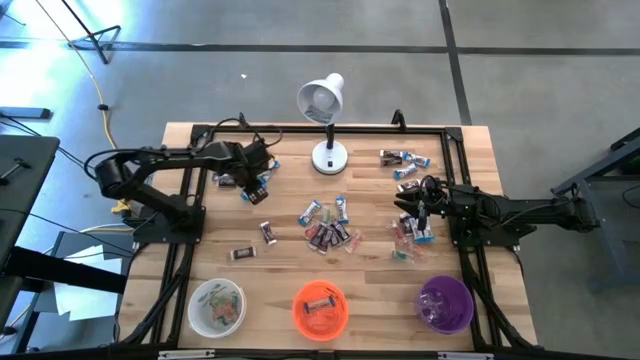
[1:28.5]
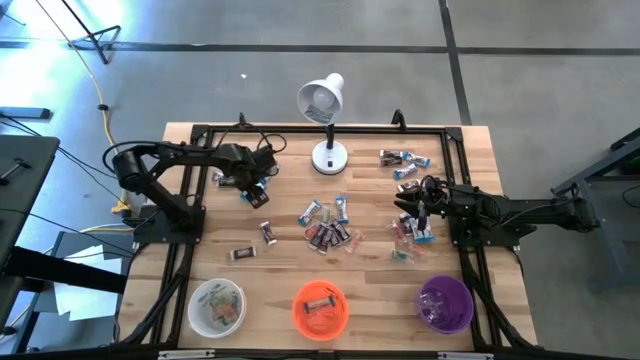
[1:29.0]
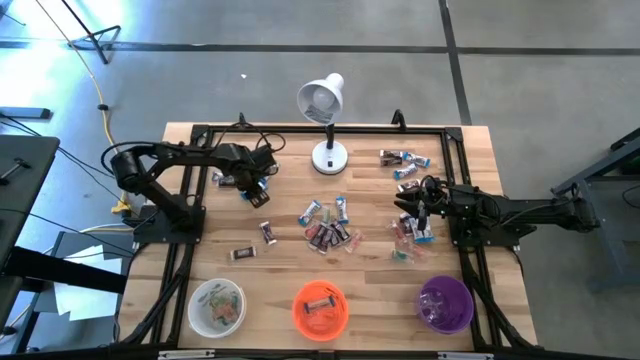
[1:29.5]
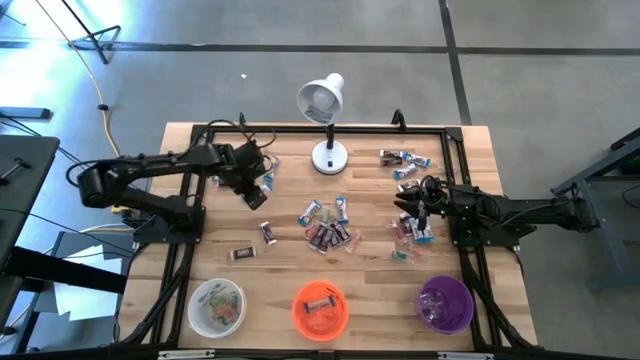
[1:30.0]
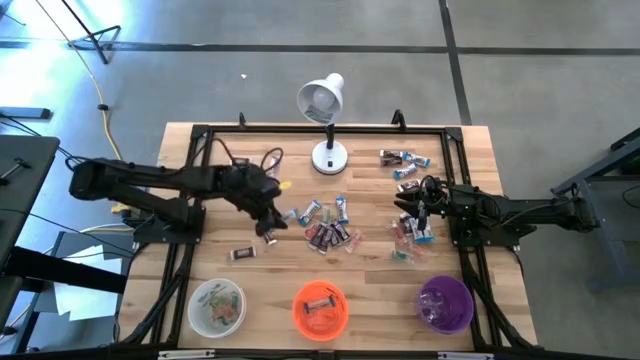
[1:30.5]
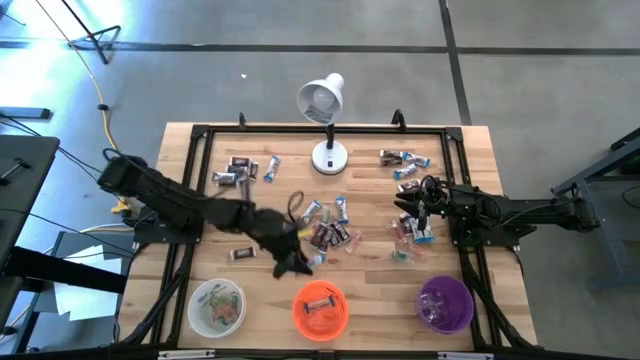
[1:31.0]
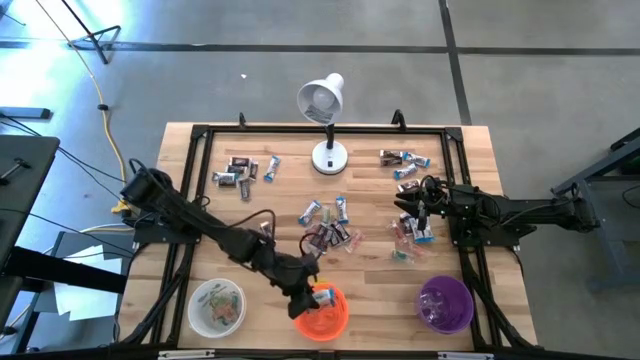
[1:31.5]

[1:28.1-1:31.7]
Task: Organize candy in baskets
Put the white chocolate bar into the orange bucket

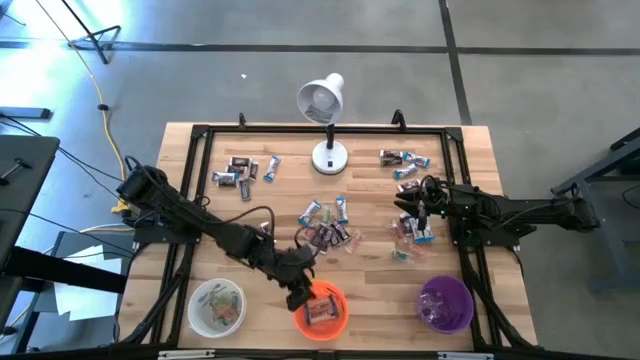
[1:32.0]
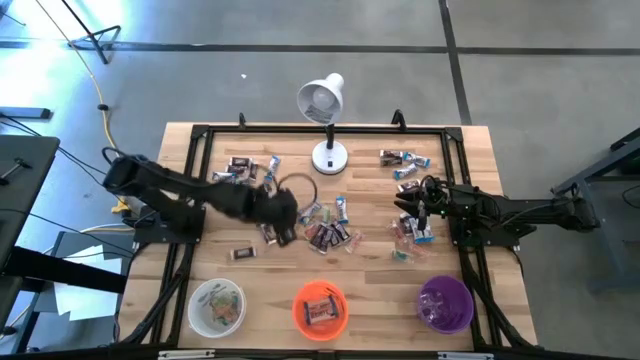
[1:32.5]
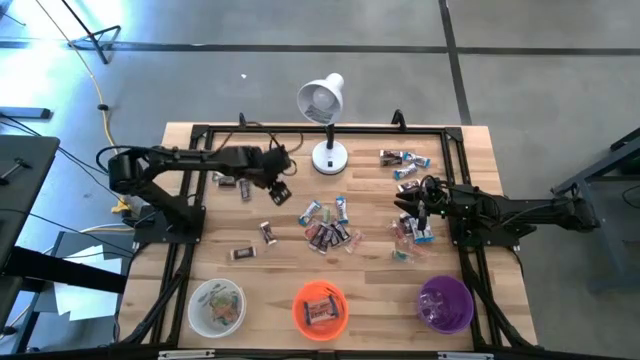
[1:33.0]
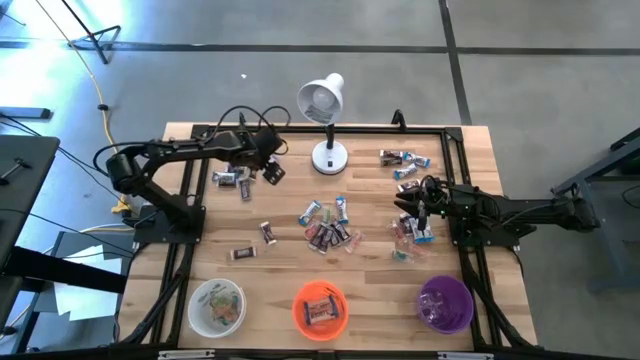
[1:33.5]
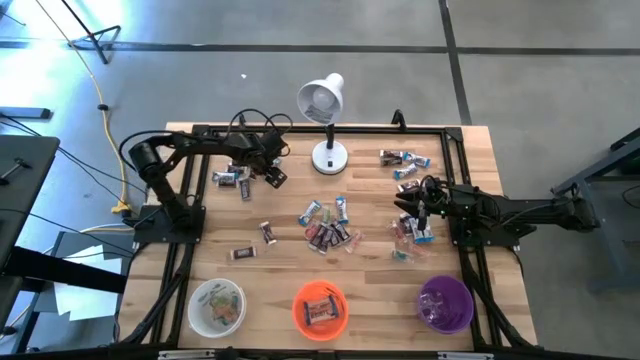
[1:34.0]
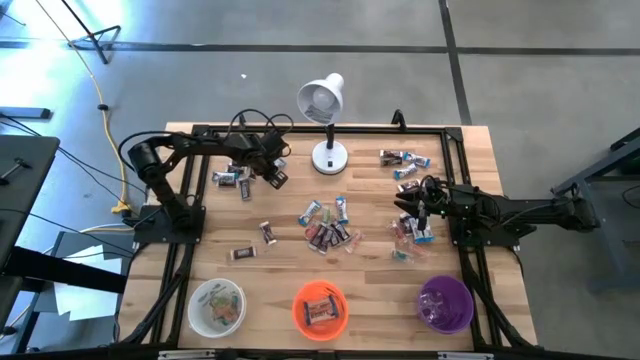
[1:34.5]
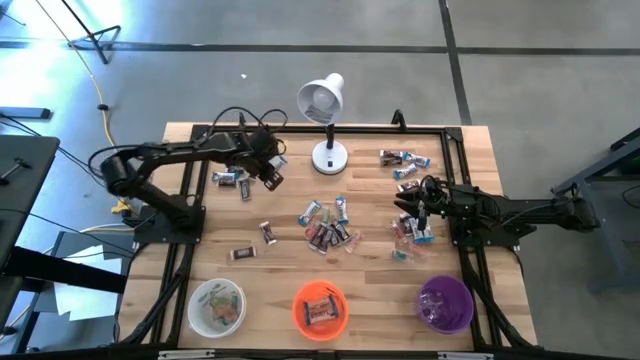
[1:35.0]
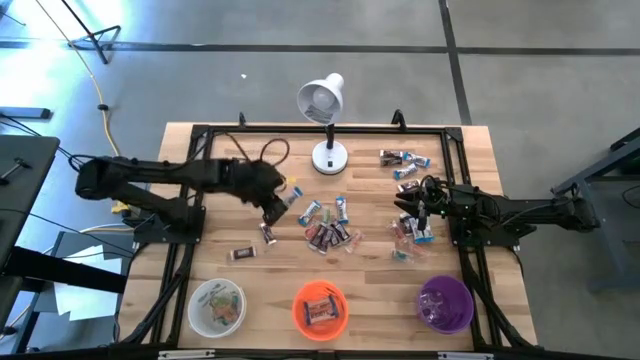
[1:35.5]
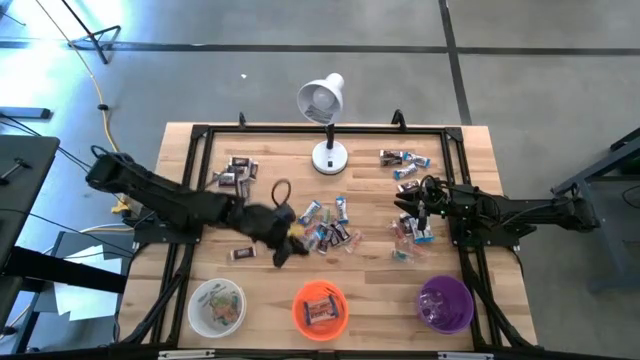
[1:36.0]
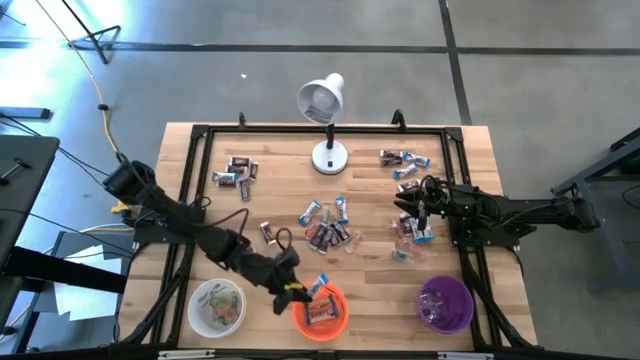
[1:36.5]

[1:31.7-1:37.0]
Put the white chocolate bar into the orange bucket

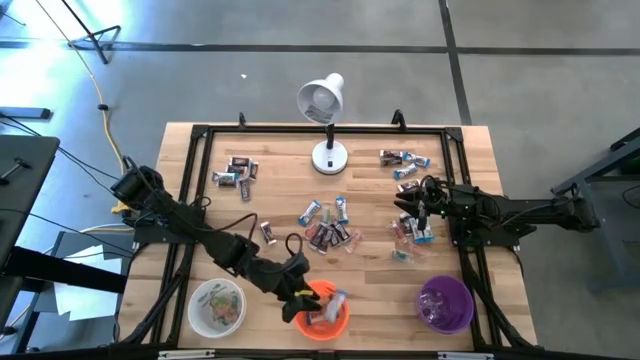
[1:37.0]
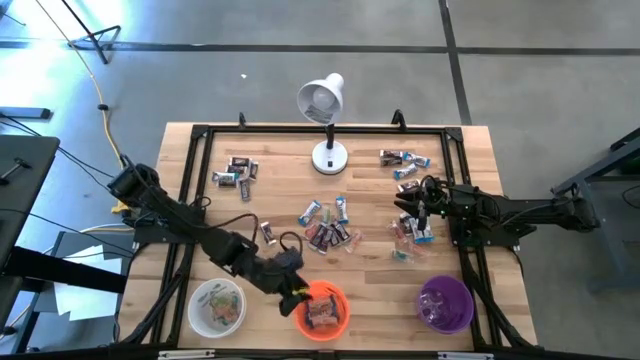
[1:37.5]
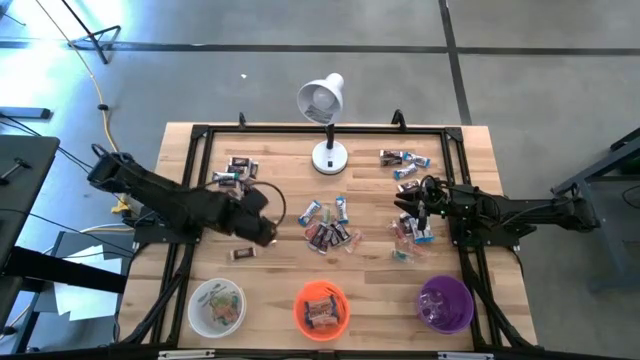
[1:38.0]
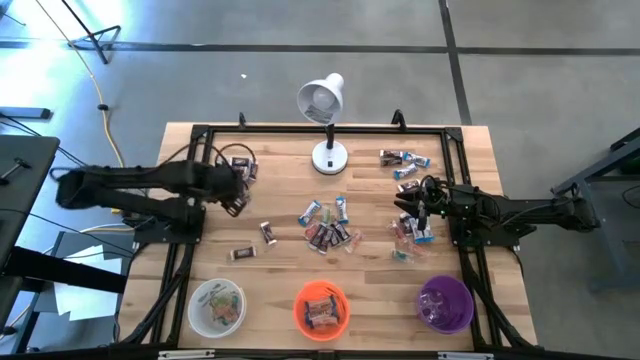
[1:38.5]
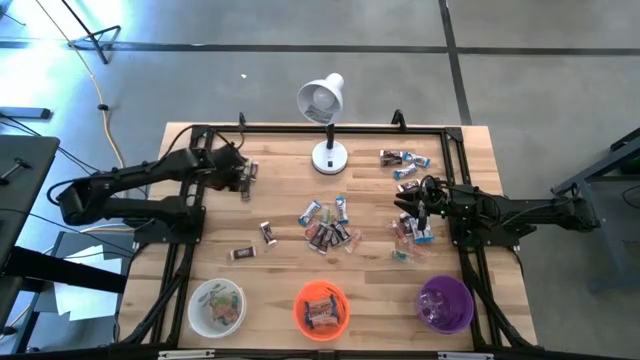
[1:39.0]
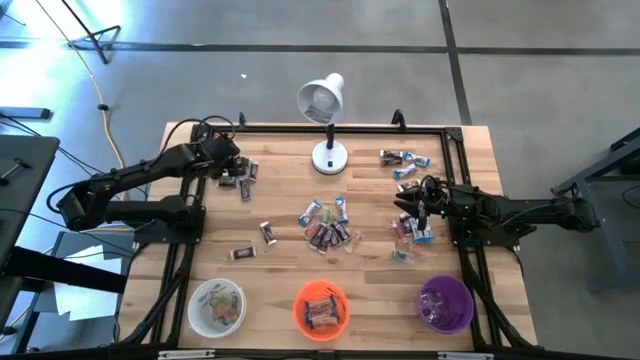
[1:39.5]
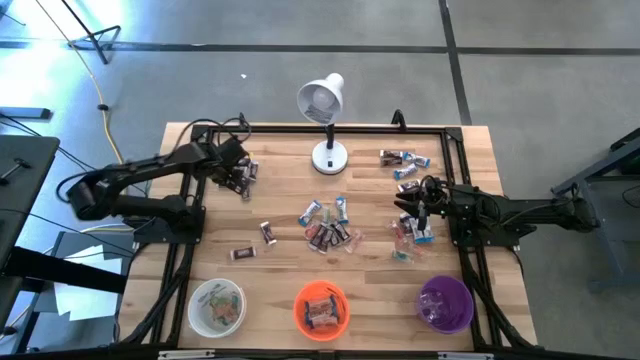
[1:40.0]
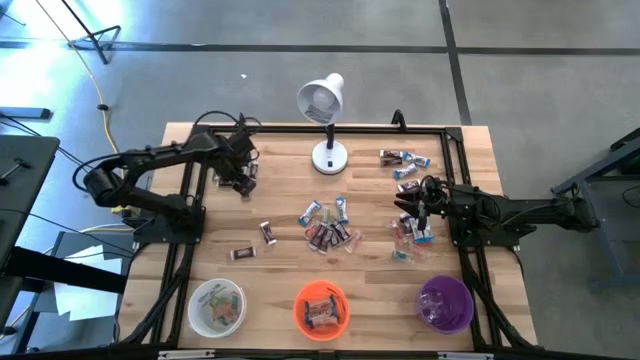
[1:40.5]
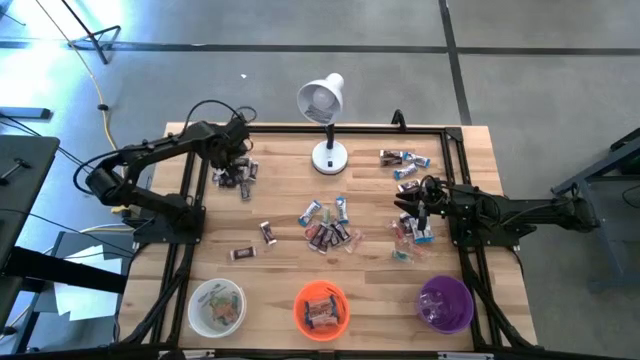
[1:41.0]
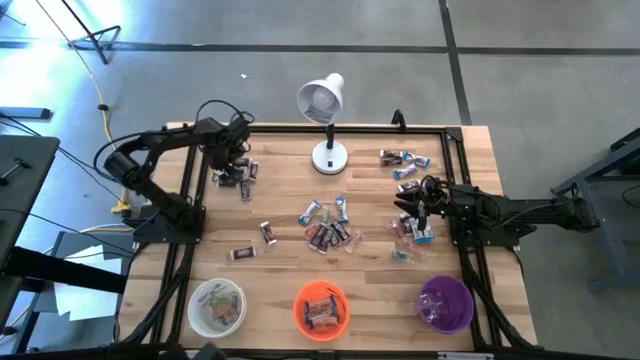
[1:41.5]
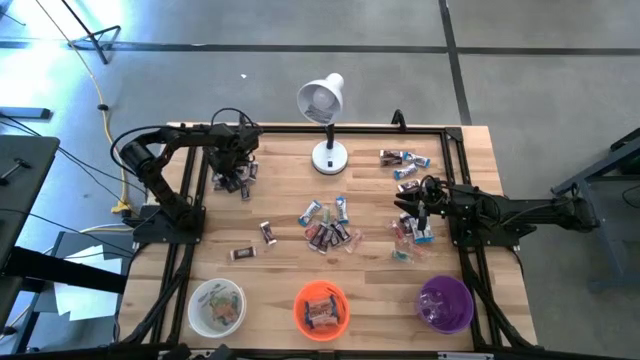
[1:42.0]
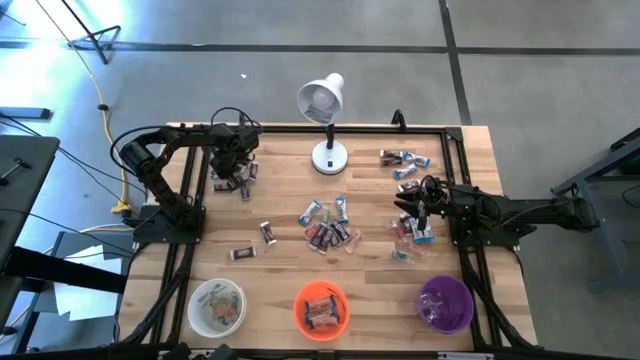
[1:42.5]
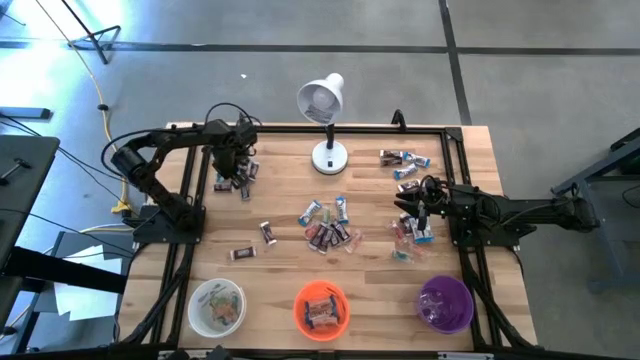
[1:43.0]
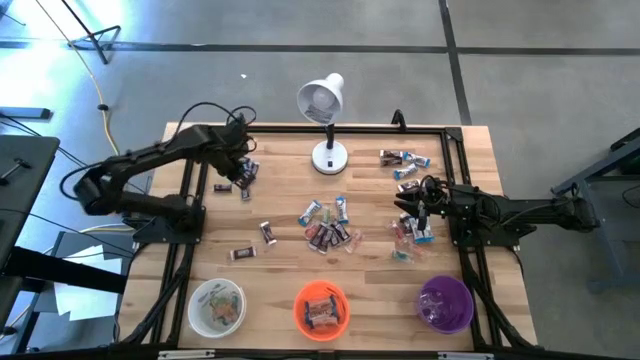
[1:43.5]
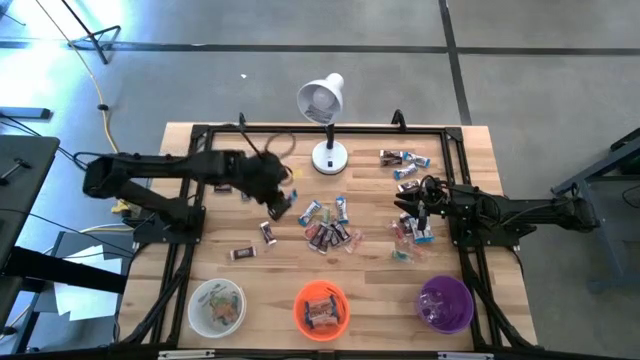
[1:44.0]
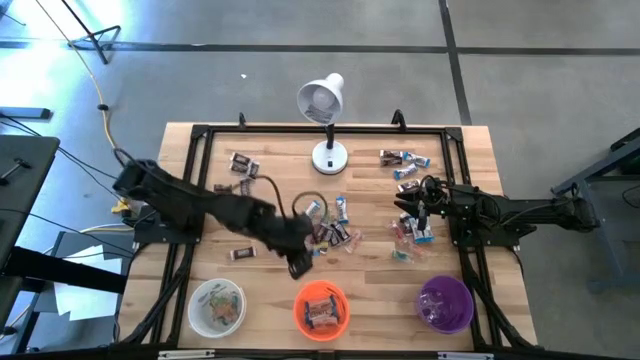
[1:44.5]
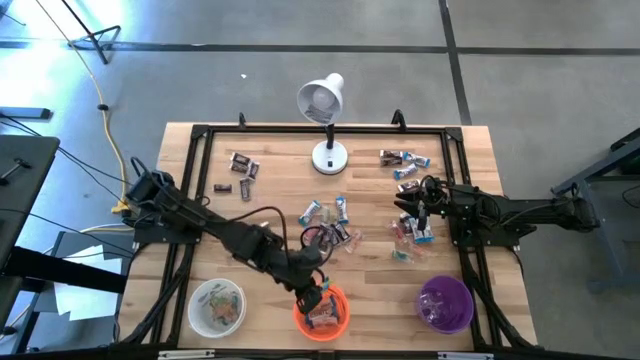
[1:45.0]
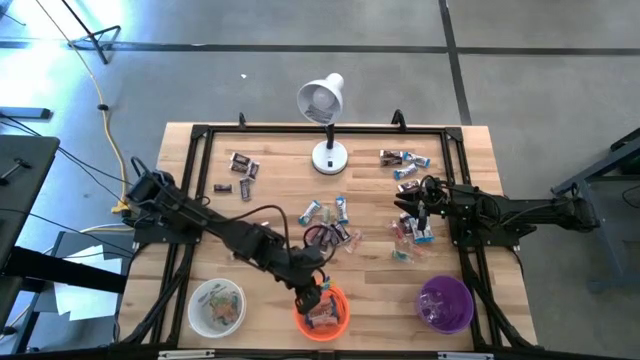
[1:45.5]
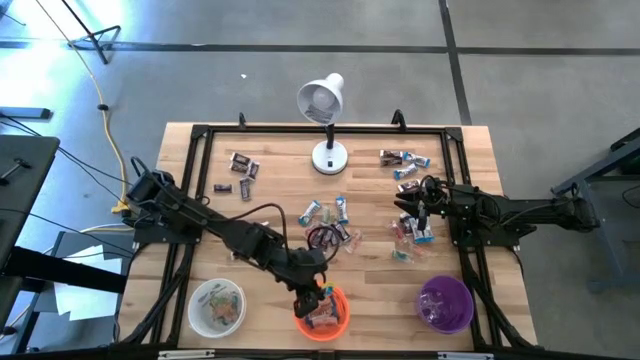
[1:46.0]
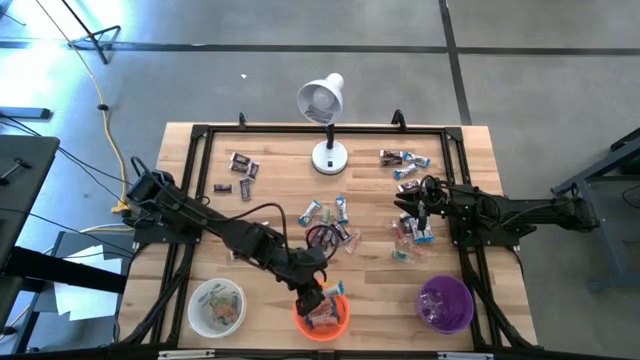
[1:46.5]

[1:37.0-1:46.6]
Put the white chocolate bar into the orange bucket

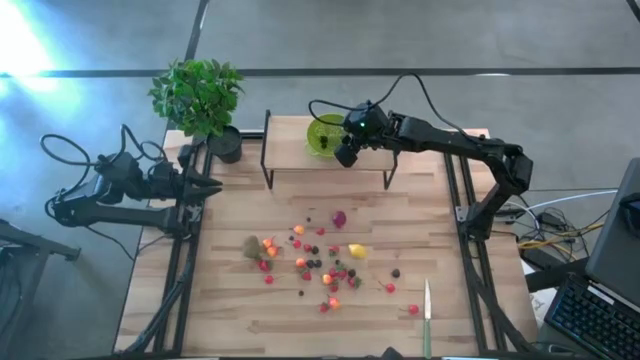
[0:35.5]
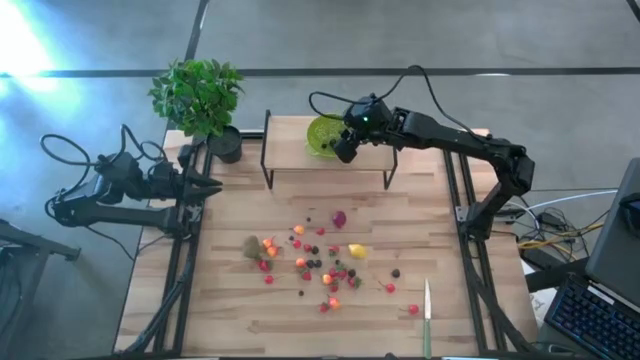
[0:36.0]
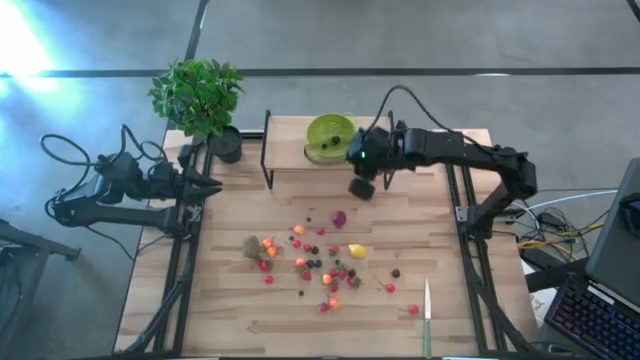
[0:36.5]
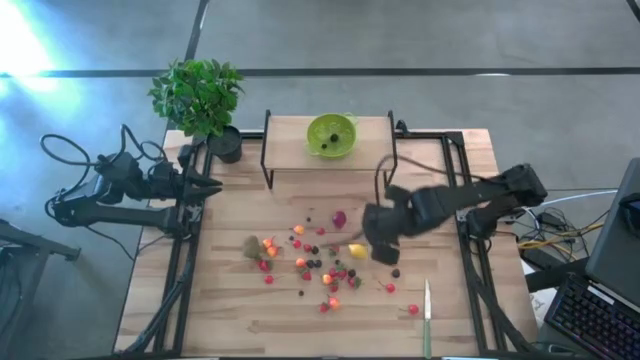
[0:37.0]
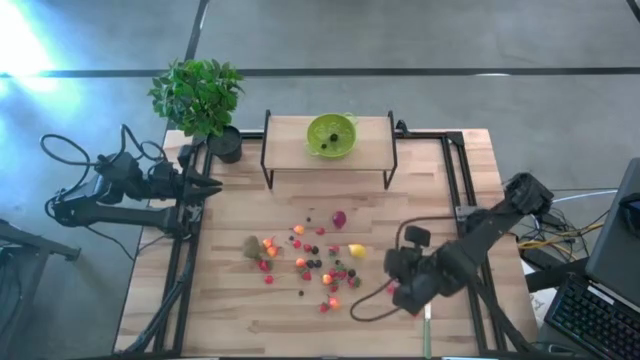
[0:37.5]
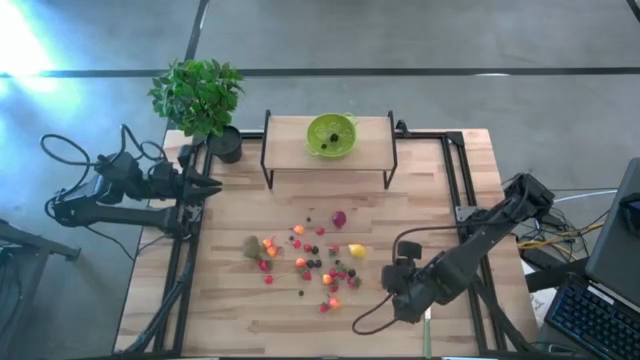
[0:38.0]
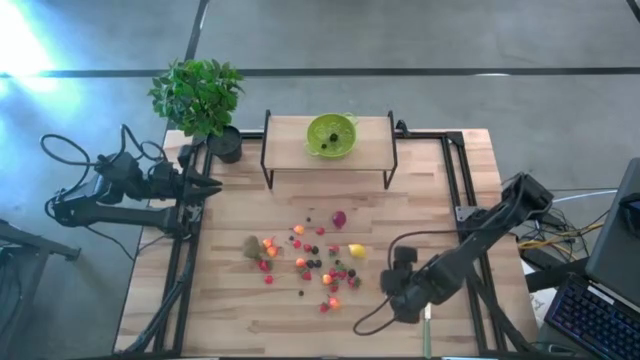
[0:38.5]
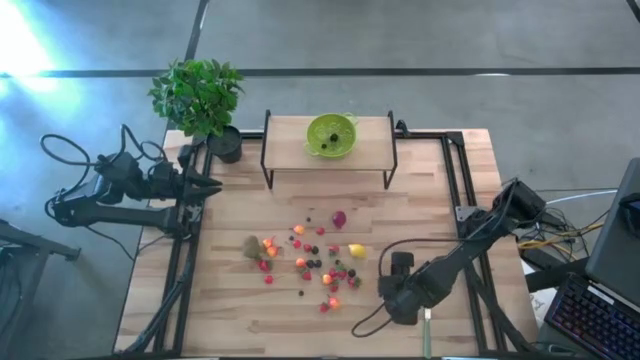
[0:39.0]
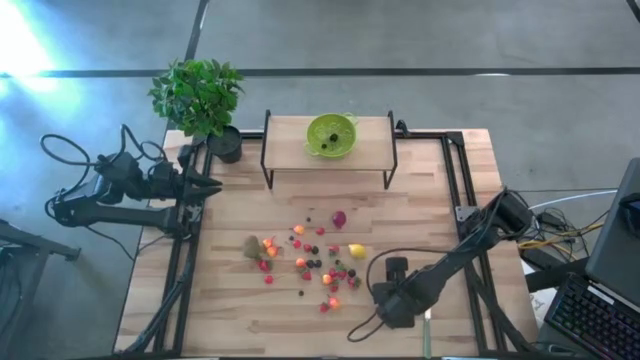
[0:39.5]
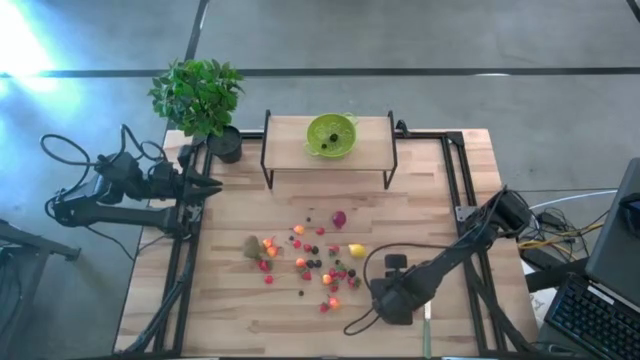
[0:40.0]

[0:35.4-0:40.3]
Task: Pick & Place Fruit
Put the red cherry into the green strainer bowl on the shelf
